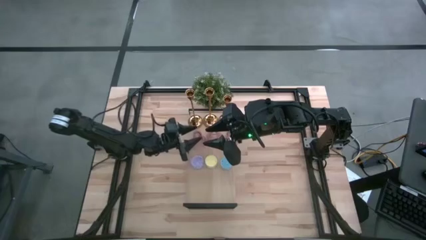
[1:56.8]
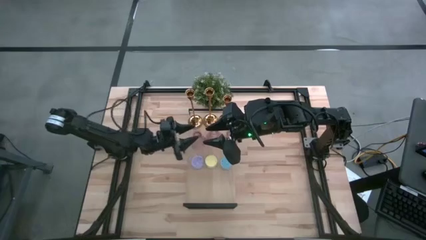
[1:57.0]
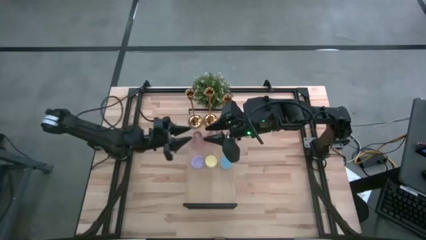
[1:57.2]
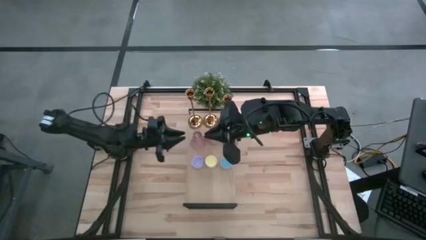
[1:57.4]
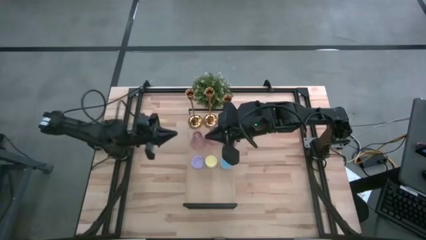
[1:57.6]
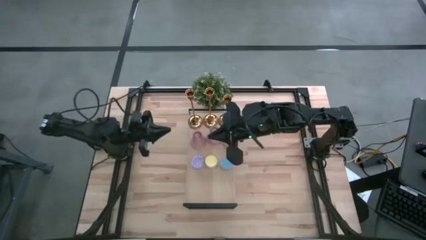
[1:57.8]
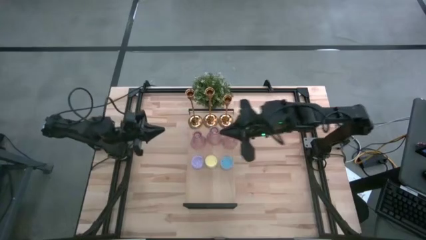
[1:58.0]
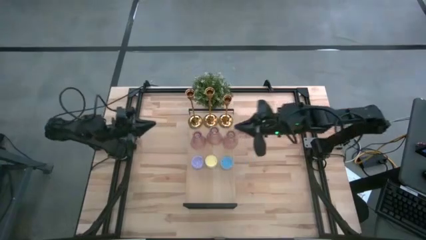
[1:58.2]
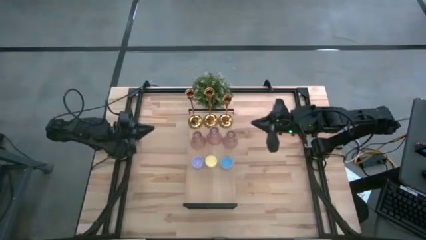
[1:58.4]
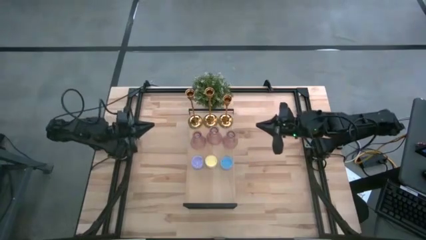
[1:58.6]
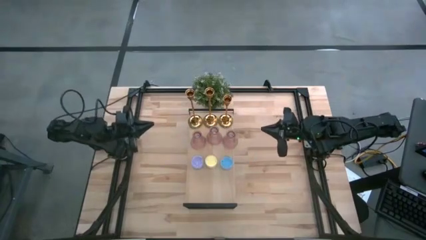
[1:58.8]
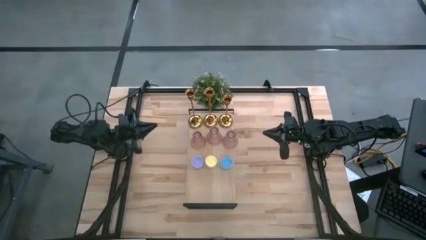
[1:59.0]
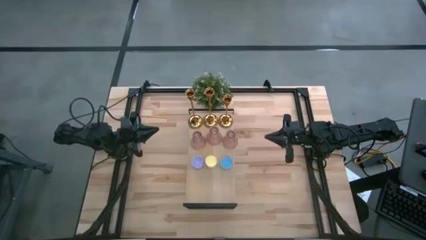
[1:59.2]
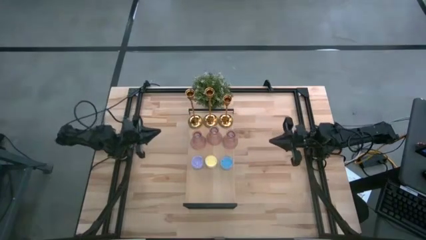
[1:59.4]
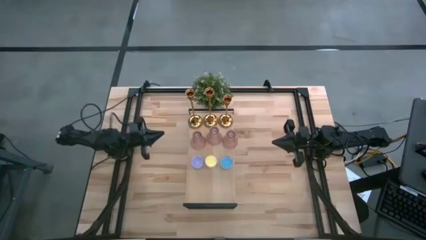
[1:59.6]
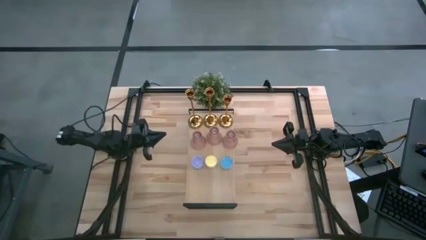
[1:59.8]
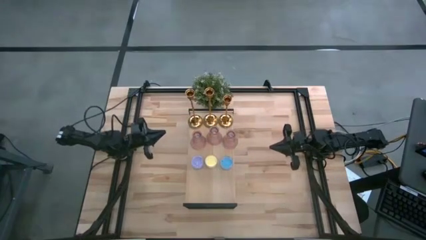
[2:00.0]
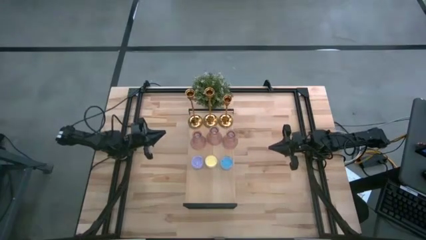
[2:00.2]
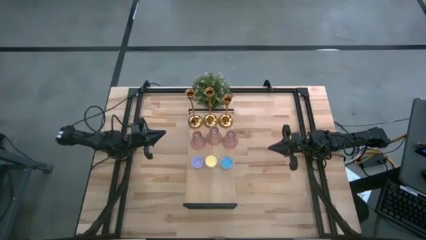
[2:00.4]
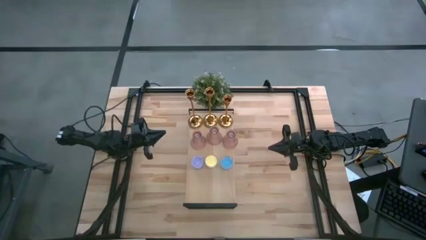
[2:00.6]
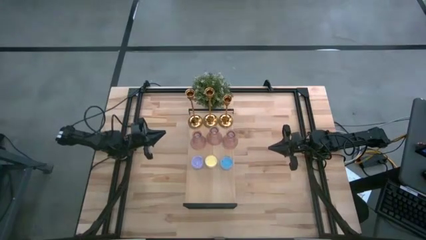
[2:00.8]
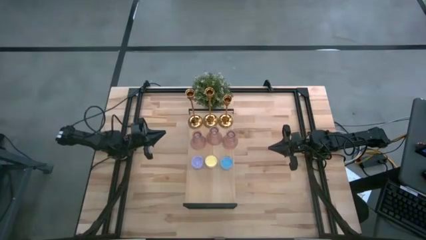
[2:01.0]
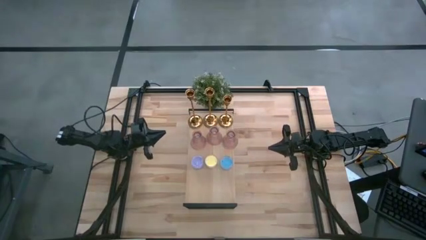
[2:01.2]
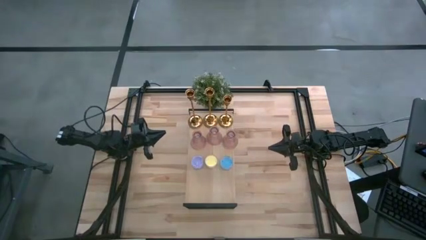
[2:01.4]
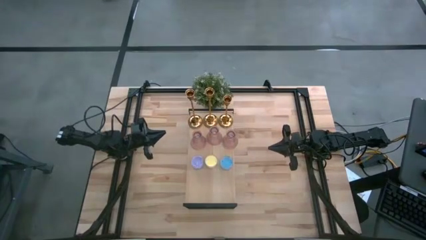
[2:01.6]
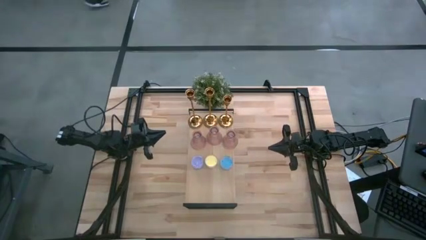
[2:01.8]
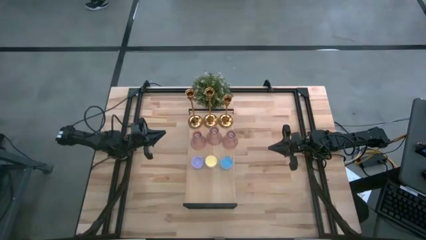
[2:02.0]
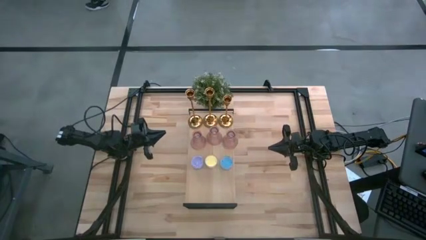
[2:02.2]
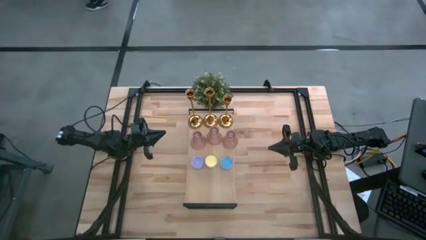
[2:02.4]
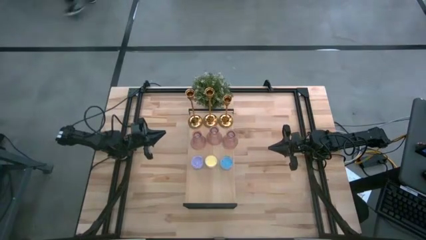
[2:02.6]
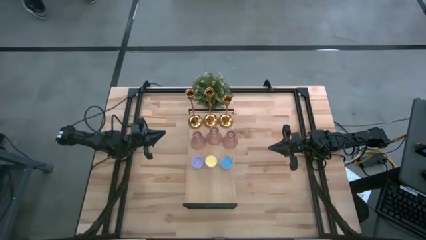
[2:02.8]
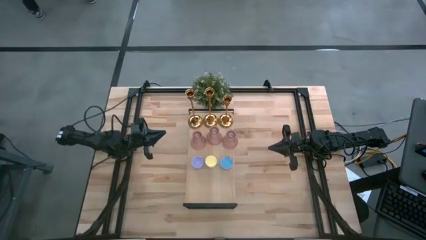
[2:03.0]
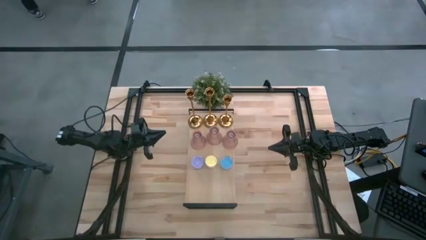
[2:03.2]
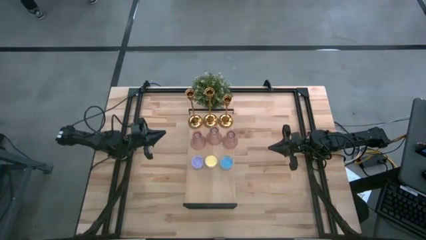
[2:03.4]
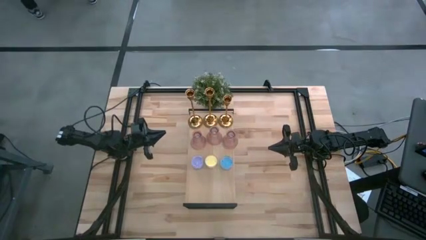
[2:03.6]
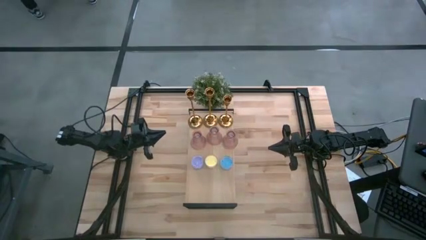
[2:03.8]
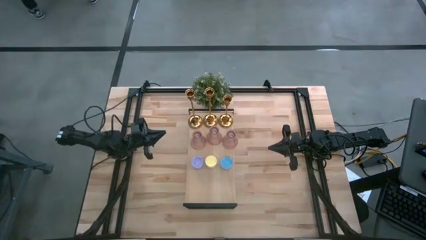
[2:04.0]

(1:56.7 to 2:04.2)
Task: Pick & Place candle stick holders
Return to Home Position

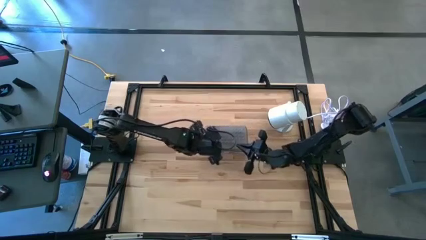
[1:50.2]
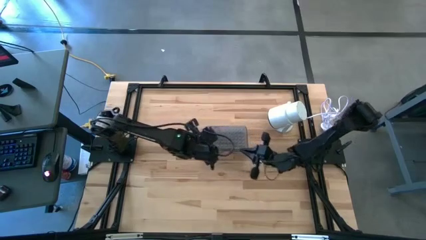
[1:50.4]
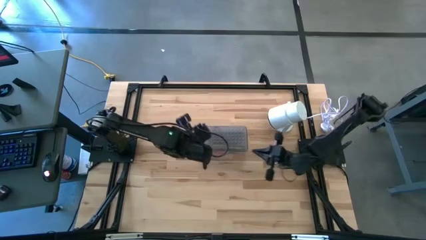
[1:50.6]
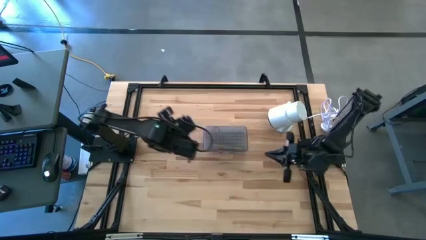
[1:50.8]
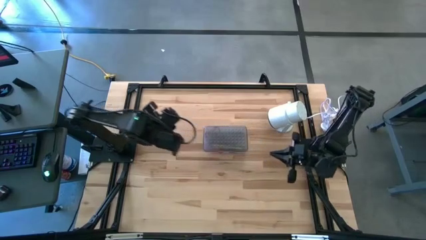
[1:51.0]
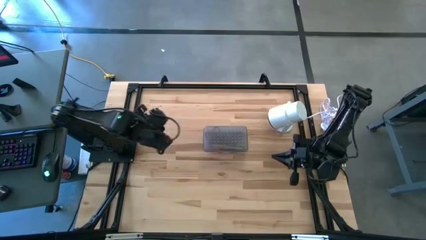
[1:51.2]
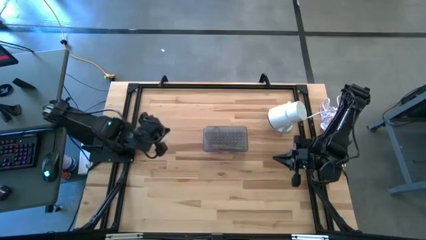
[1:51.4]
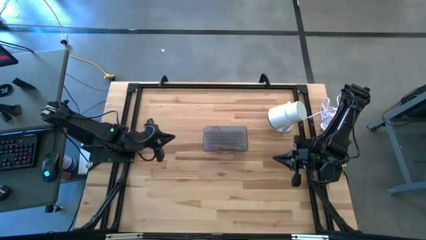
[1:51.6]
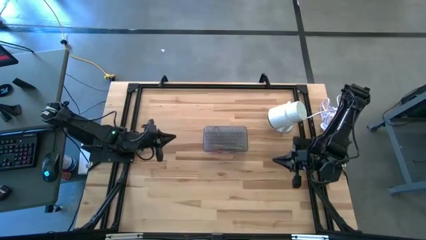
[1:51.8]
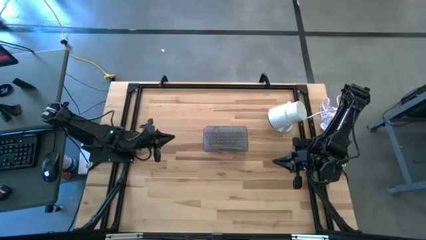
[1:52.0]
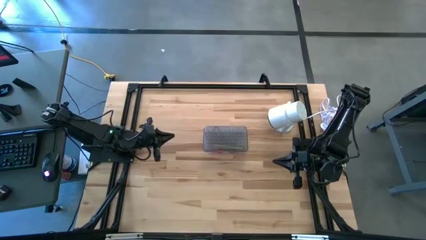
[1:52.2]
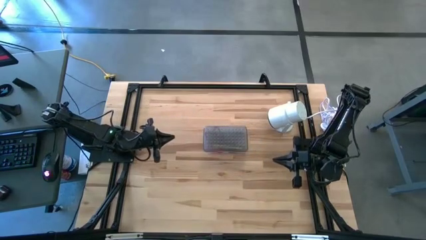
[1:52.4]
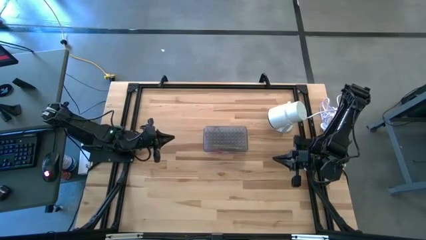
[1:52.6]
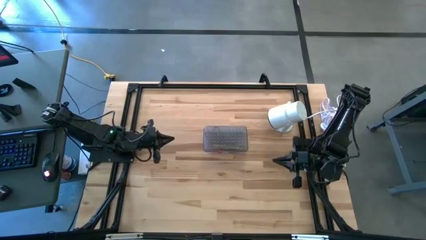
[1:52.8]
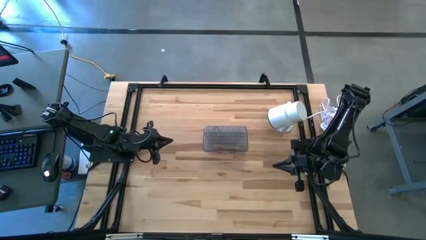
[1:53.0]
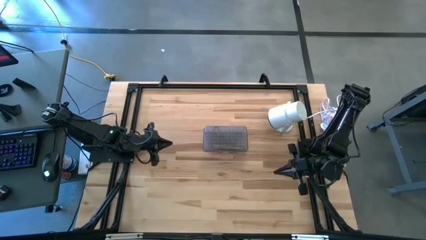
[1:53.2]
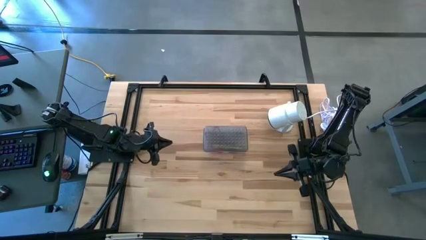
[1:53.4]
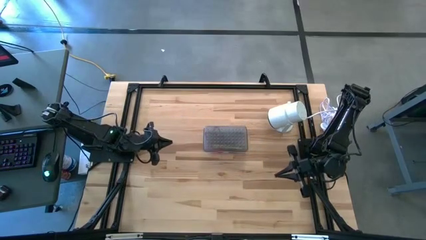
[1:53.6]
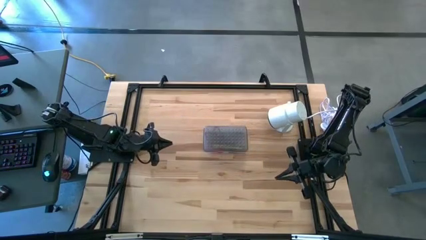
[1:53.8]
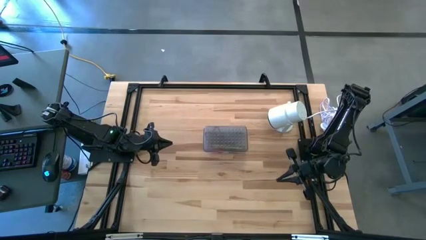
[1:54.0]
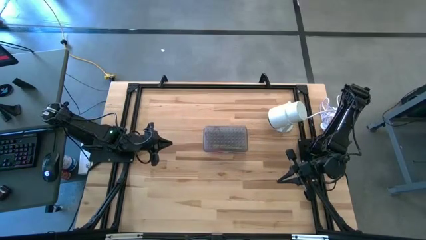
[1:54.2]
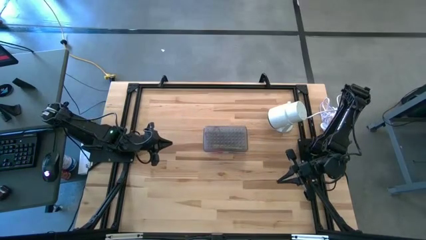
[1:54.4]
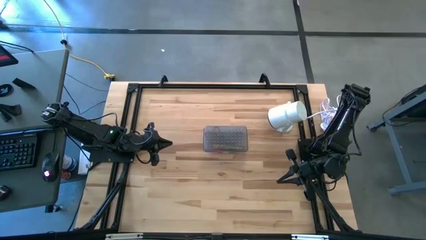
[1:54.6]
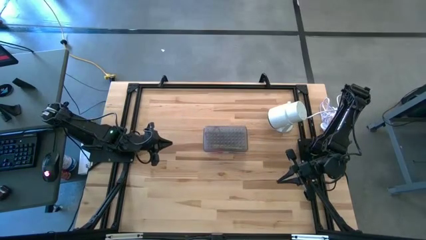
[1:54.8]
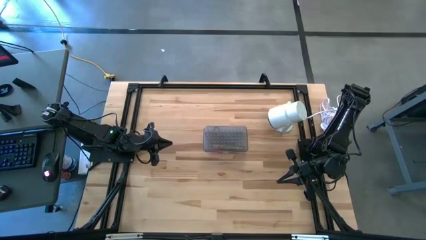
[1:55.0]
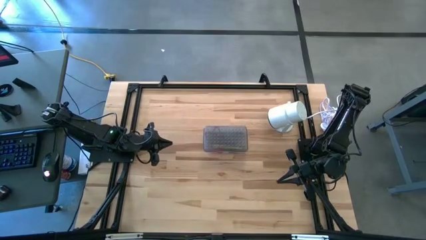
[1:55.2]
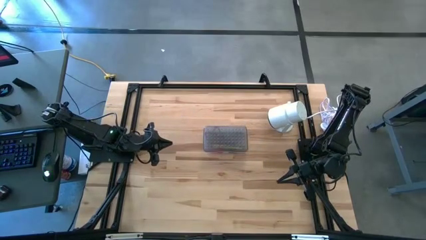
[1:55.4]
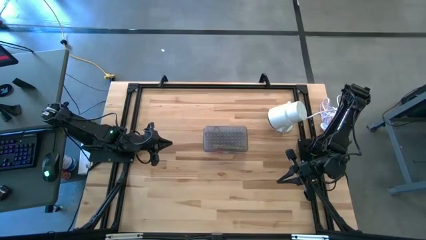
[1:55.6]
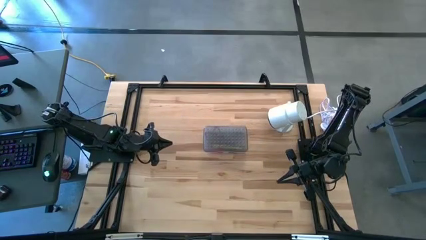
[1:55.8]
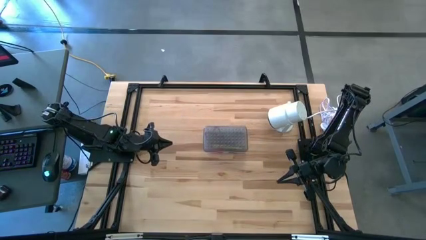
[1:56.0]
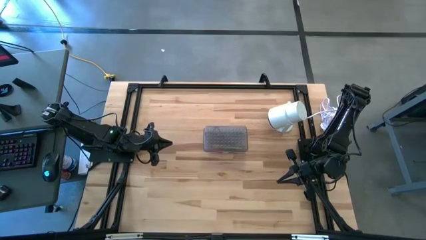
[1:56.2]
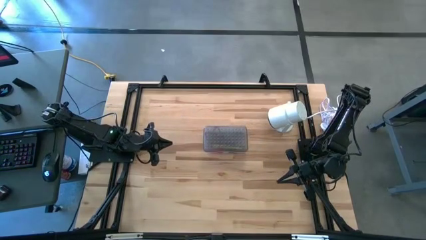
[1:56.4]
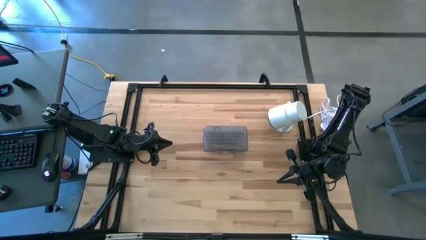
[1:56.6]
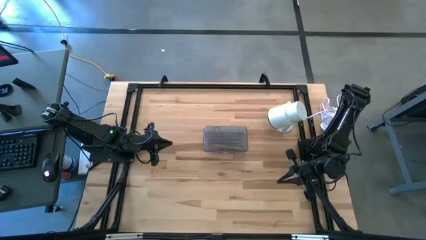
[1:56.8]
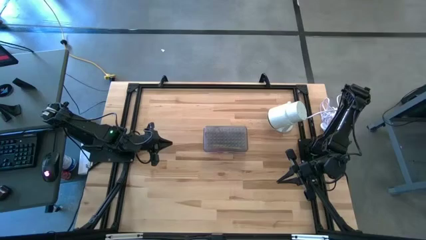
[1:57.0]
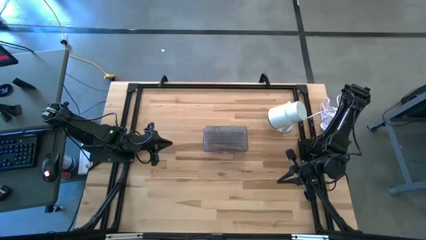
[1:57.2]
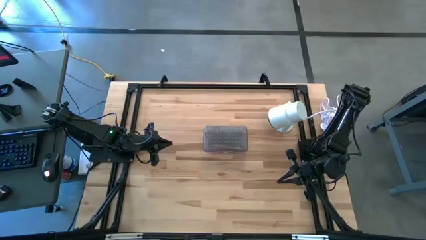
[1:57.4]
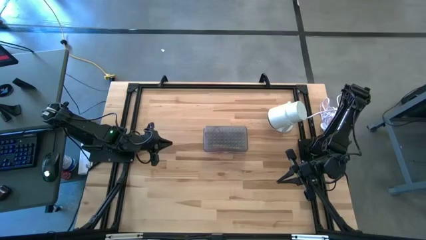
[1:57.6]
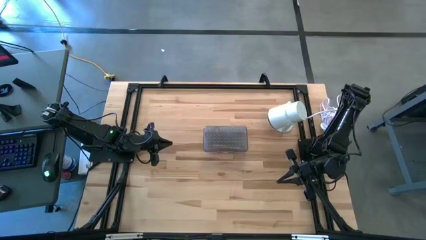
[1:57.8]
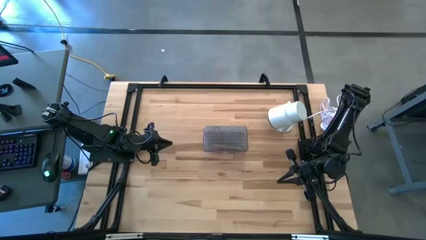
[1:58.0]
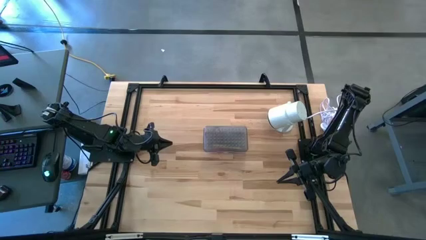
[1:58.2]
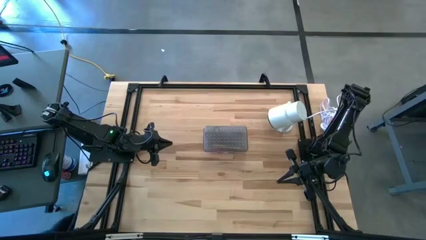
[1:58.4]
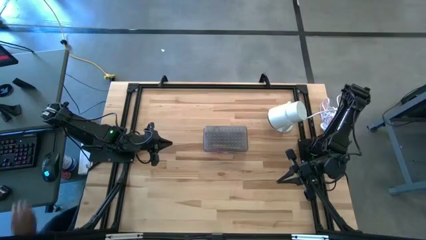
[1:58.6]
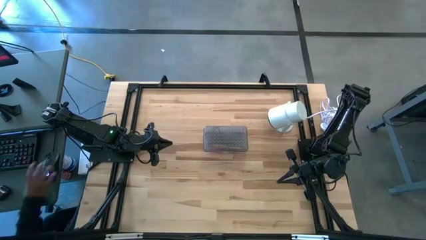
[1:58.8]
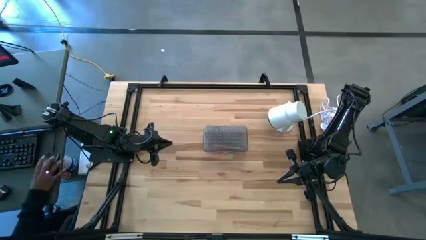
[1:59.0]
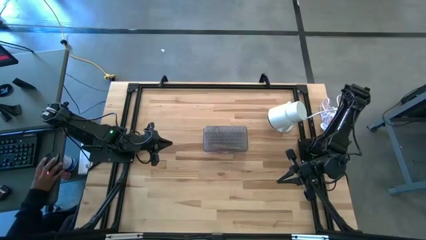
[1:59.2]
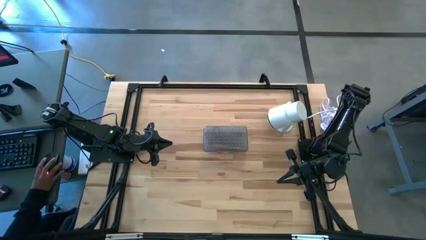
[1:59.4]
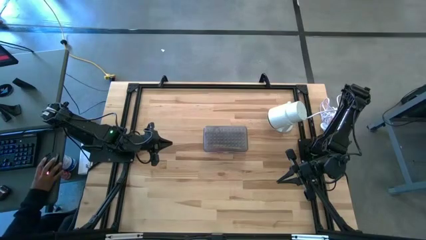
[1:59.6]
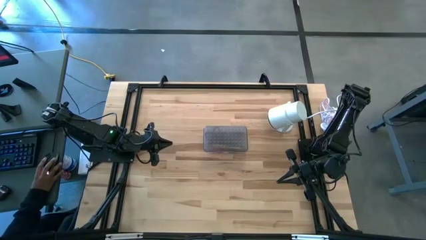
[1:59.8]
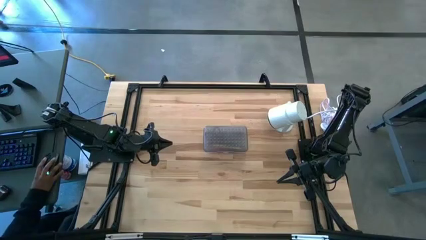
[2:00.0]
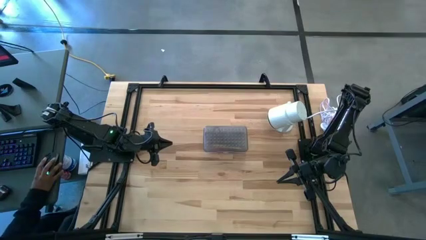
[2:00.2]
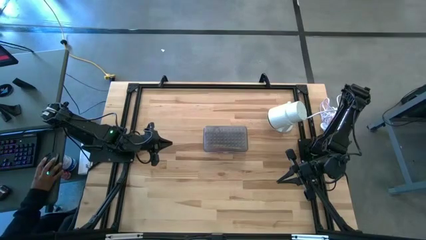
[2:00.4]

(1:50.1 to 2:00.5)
Task: Pick & place school supplies into a supply box
Return to Home Position
